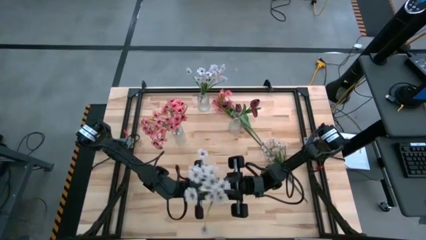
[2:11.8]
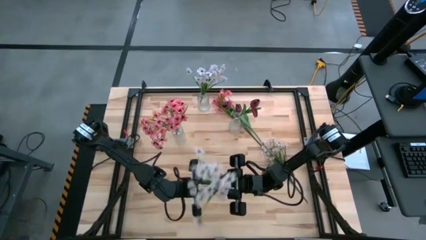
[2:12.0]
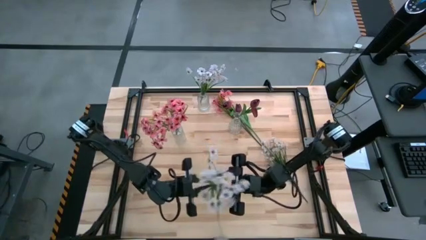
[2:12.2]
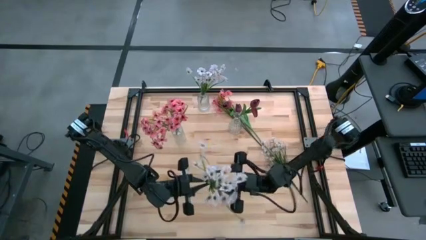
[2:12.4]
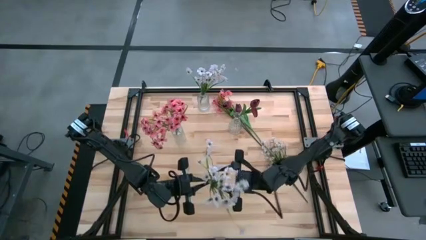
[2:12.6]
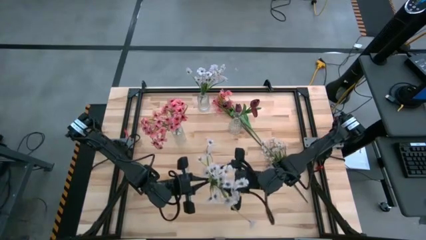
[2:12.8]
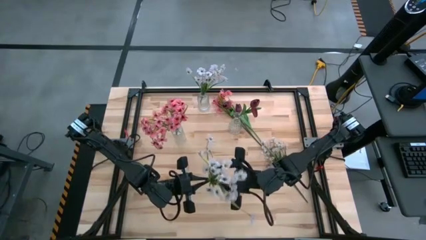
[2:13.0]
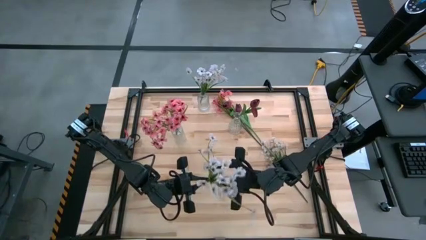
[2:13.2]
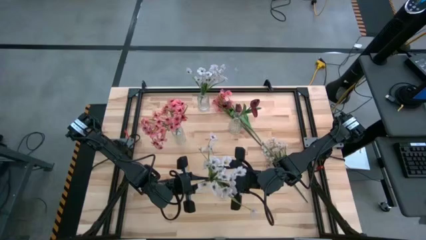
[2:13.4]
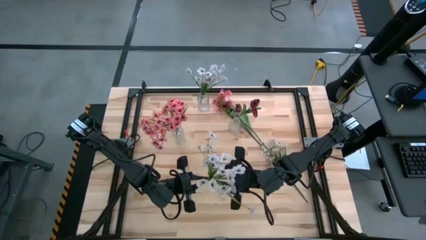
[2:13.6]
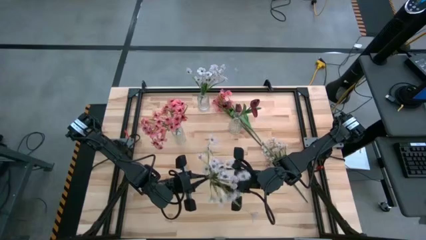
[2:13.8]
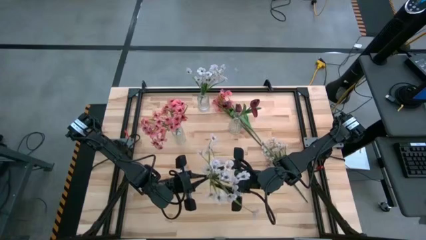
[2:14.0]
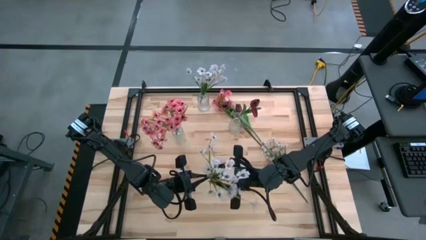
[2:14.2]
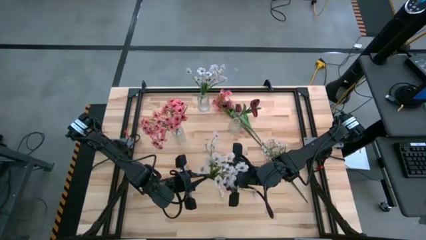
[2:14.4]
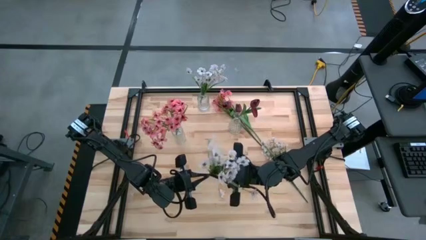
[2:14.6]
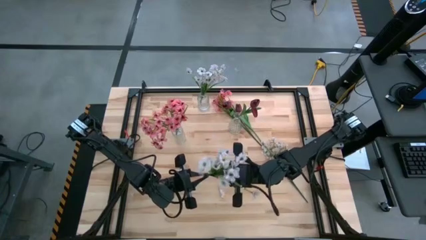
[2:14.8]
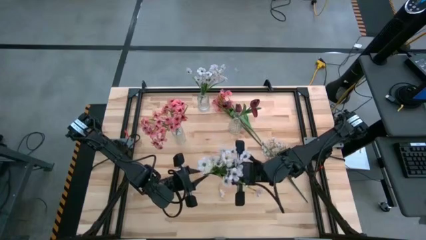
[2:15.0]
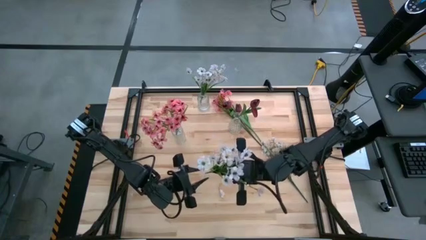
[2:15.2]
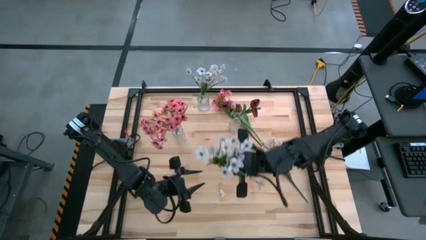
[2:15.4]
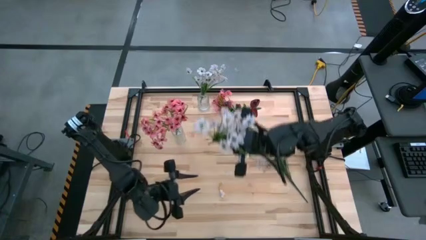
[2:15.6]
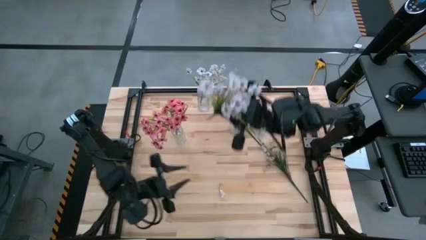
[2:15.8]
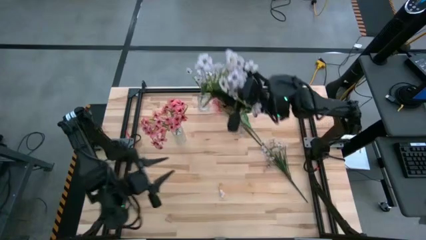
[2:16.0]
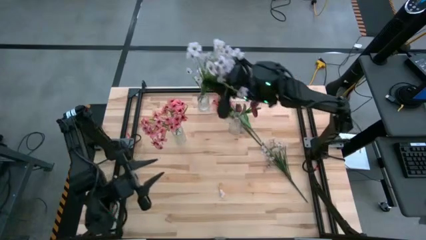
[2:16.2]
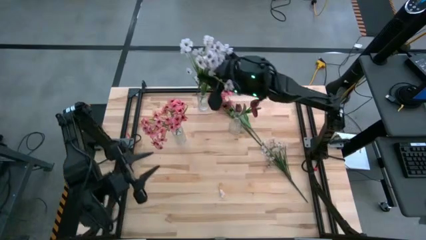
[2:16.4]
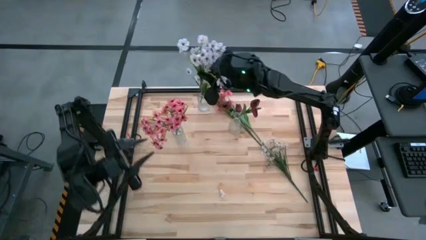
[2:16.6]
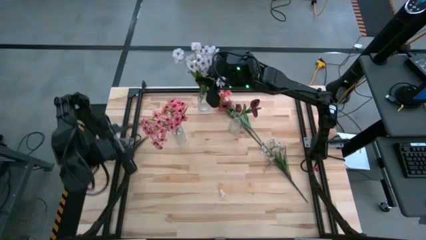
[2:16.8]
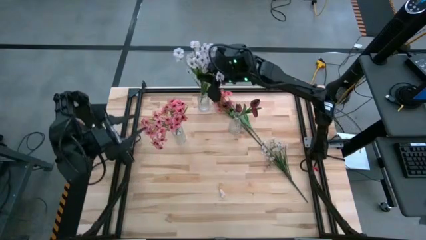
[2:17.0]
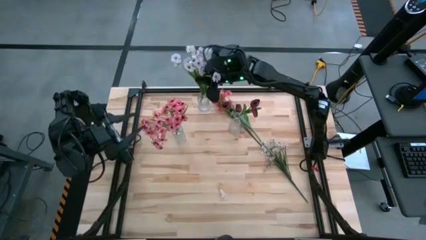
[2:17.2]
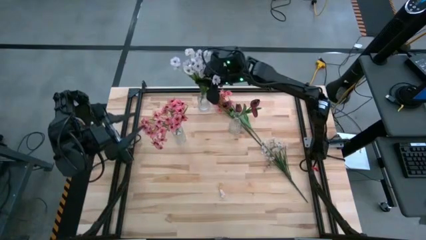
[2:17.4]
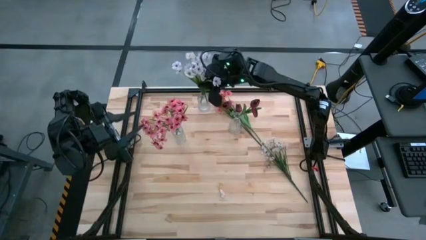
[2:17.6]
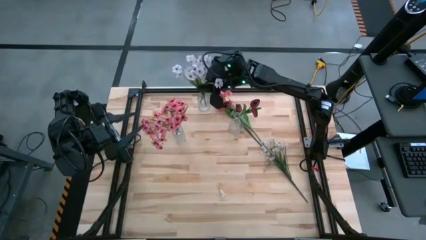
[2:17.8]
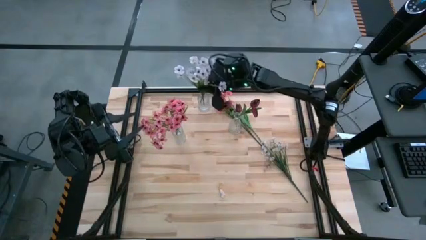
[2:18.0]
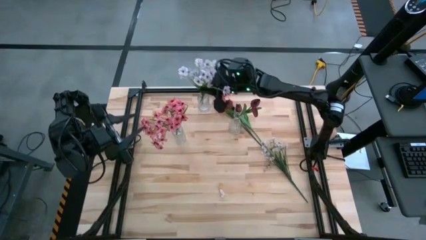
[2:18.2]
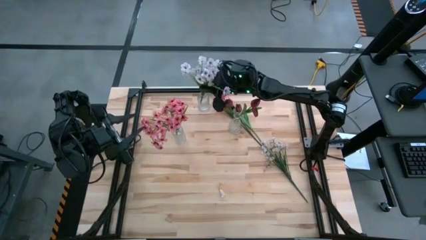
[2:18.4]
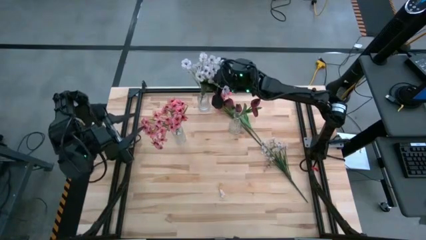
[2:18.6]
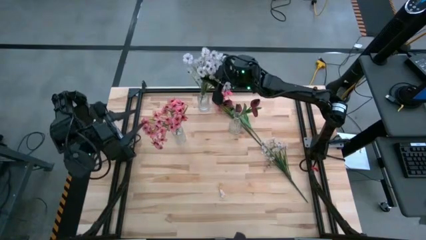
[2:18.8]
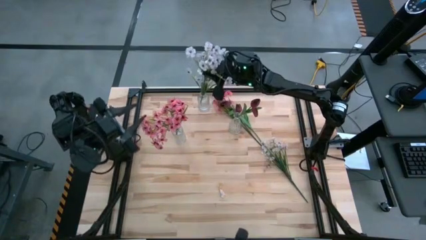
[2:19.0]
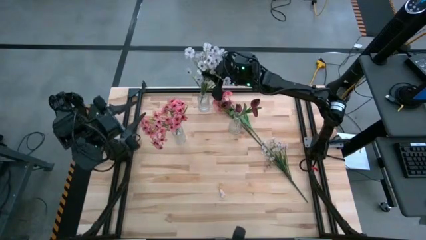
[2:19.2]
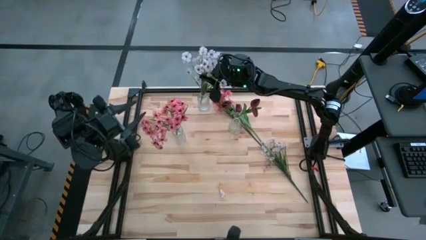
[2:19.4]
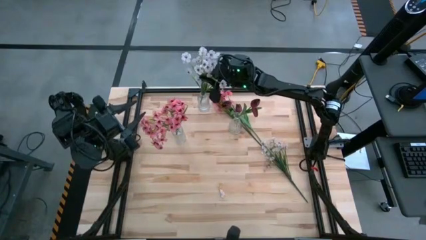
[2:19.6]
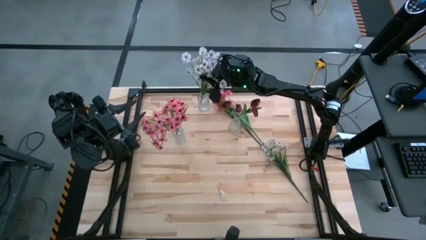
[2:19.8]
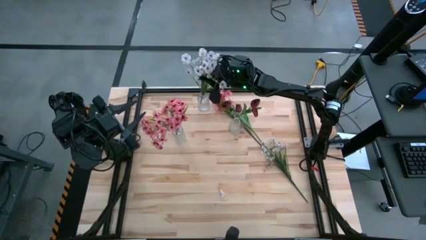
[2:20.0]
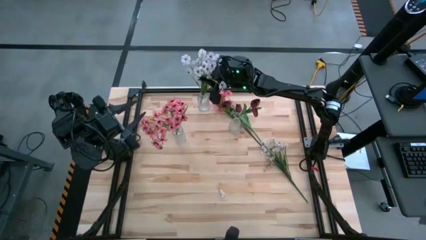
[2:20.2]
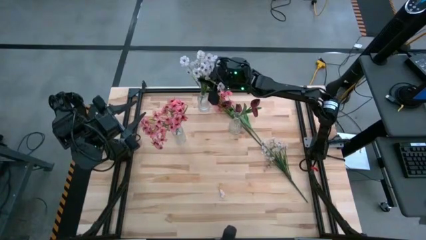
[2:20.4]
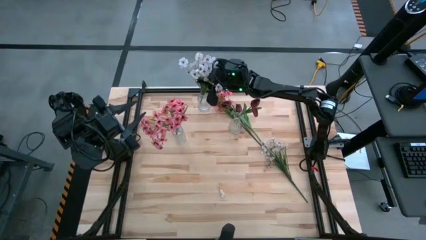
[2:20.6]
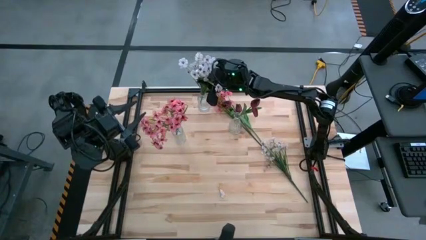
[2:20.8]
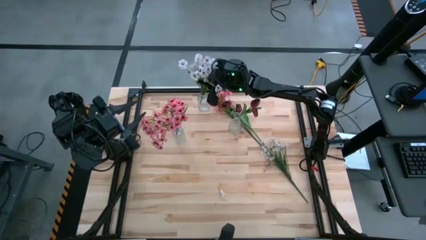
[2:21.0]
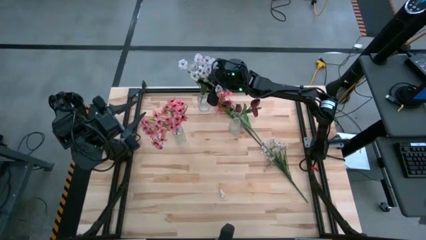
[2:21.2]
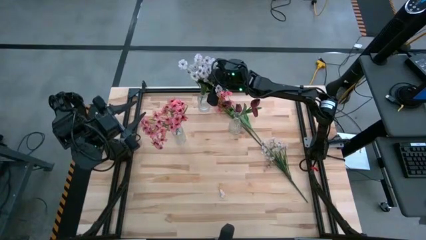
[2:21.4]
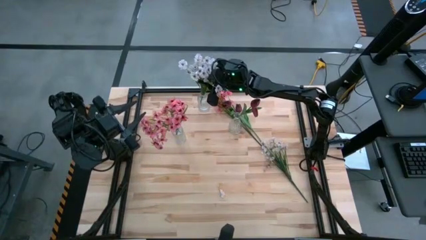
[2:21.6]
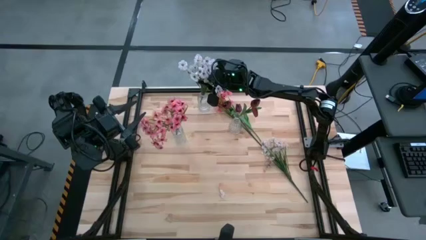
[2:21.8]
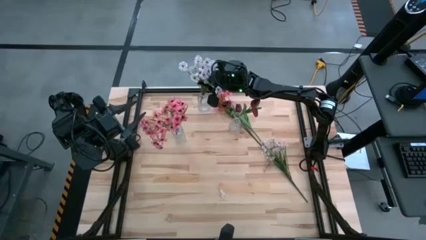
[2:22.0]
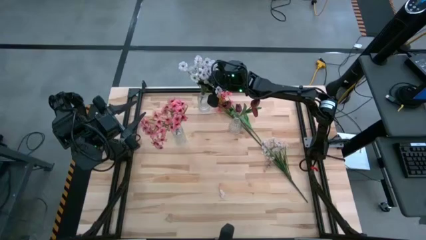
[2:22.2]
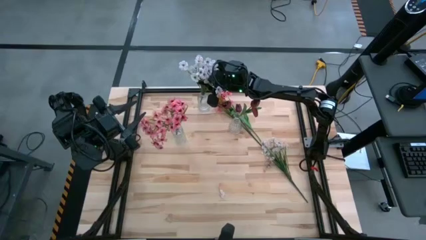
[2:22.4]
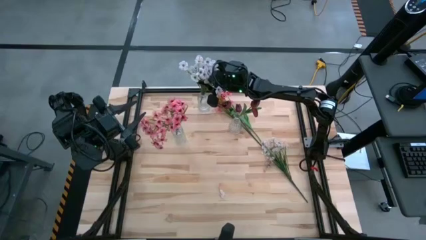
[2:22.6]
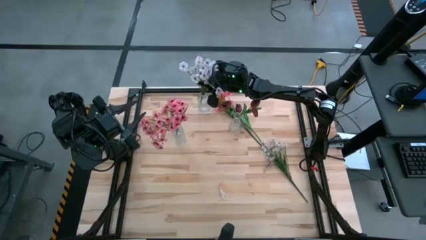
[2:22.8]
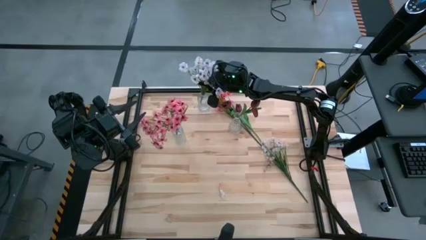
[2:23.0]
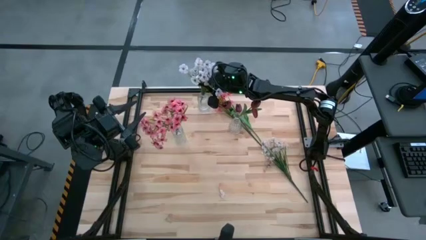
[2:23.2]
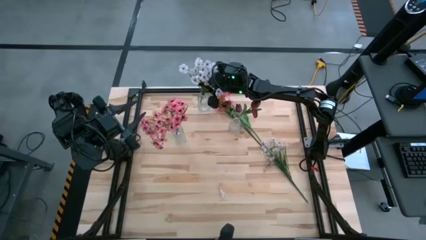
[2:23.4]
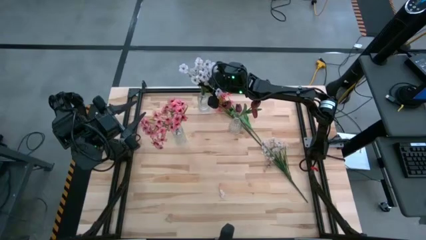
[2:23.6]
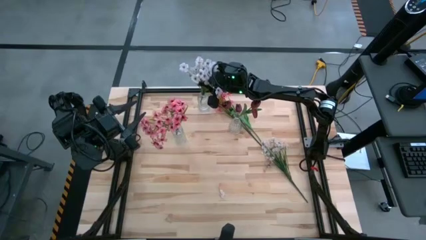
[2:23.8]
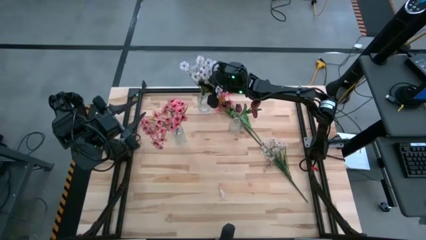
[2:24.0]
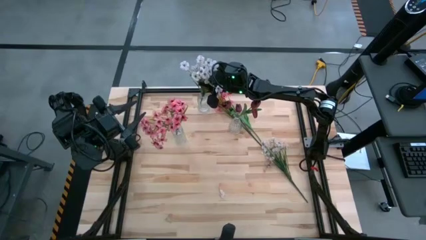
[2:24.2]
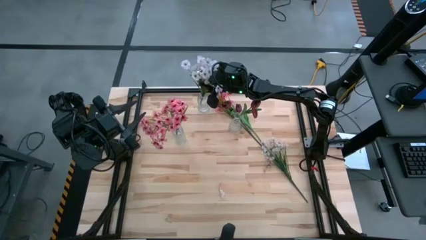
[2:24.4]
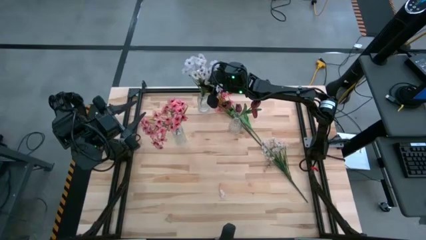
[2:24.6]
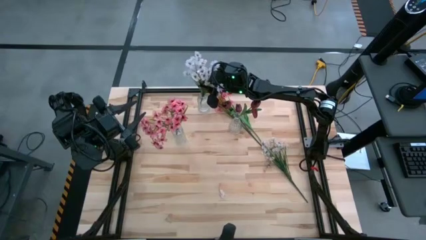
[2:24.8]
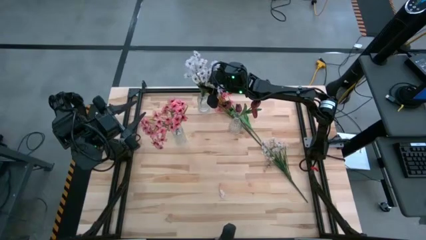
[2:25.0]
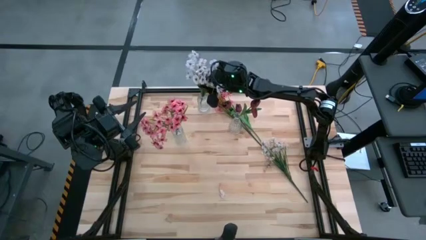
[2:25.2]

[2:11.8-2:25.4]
Task: Sort flowers into vase by color
Put the top white flower into the top transparent vase
